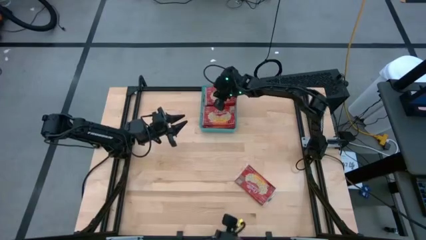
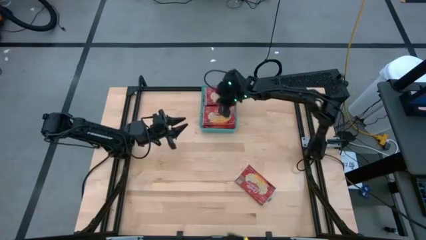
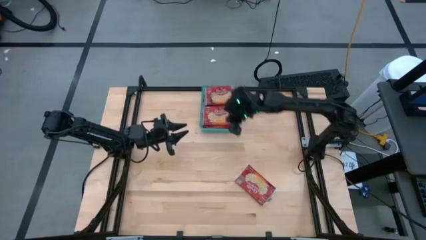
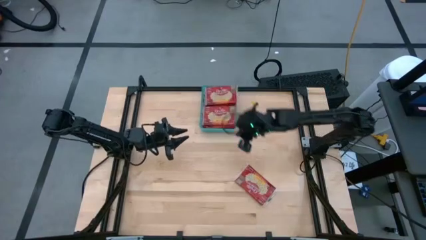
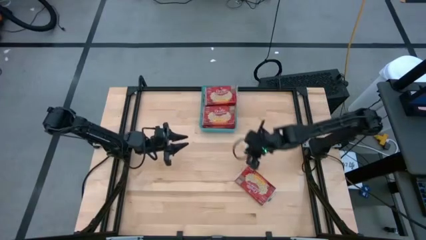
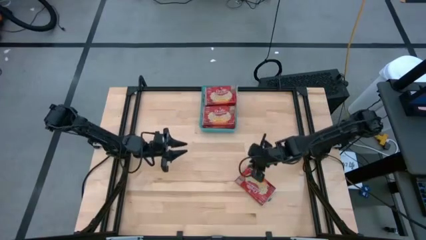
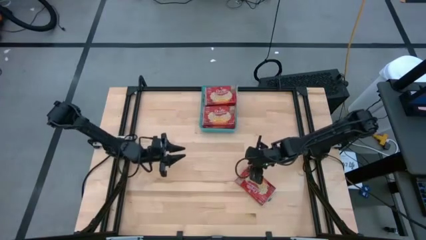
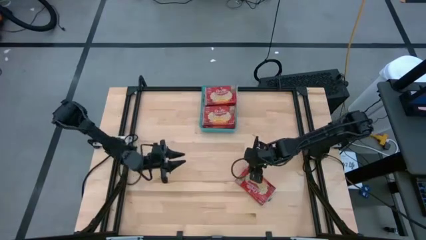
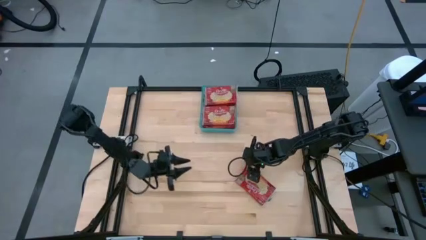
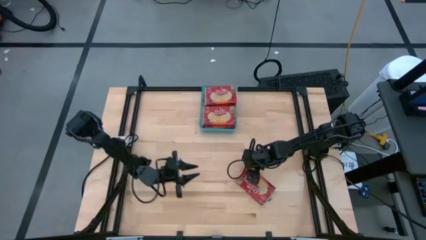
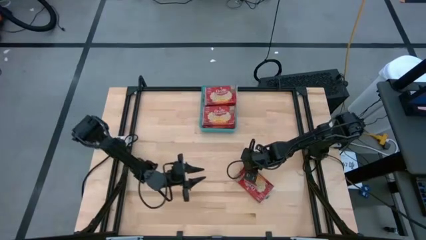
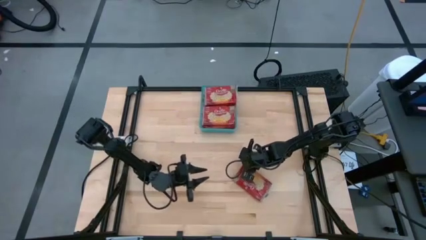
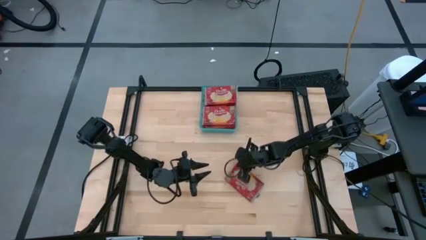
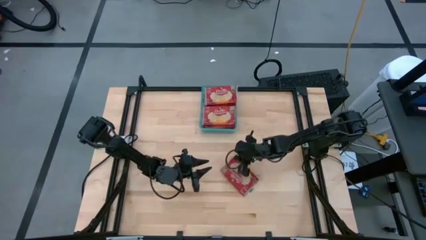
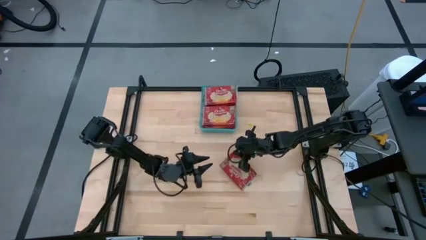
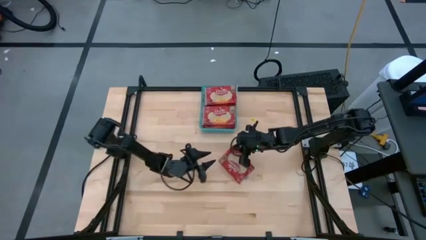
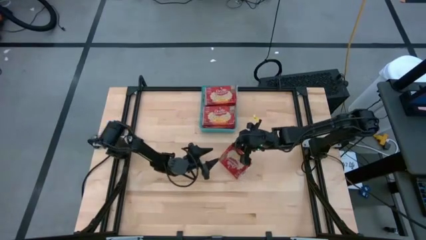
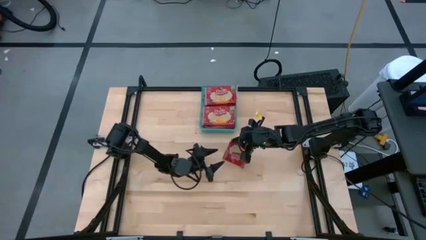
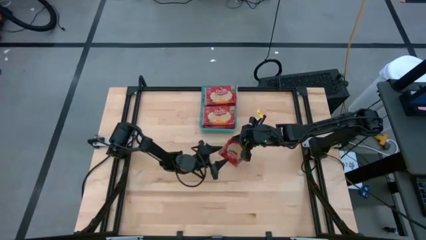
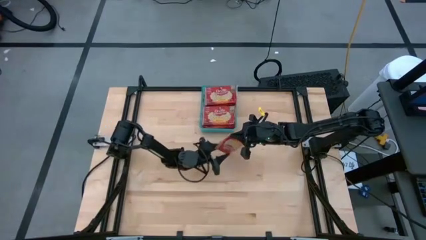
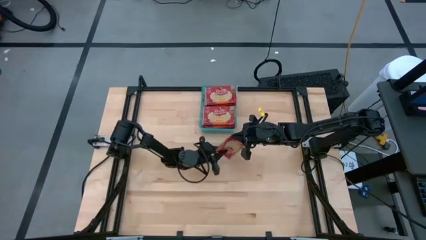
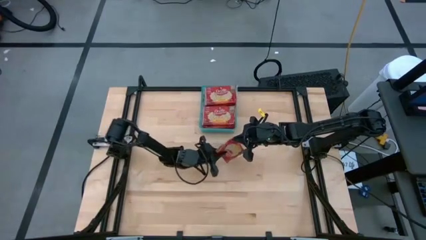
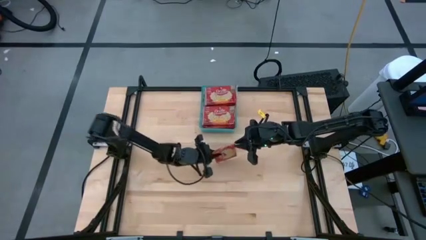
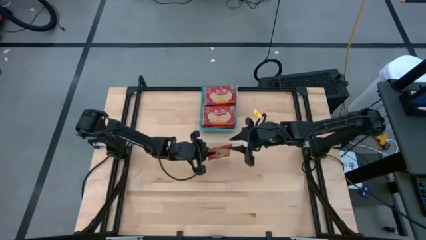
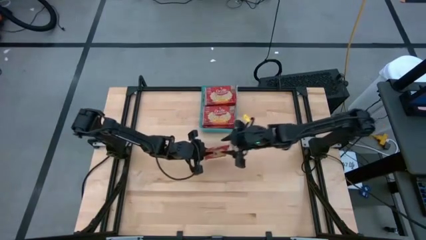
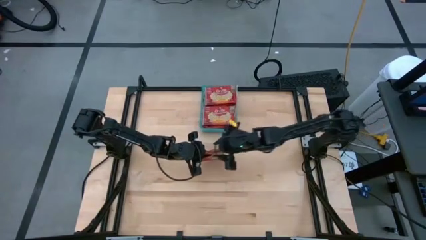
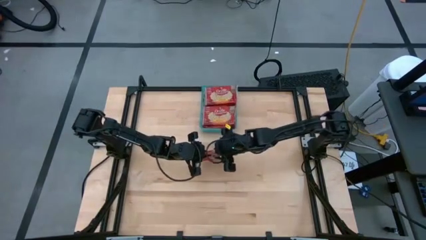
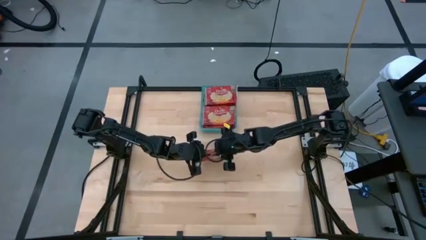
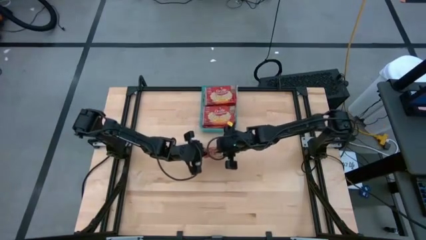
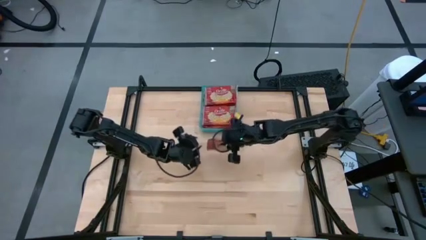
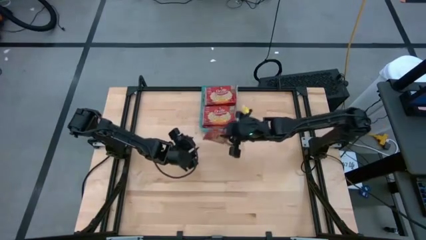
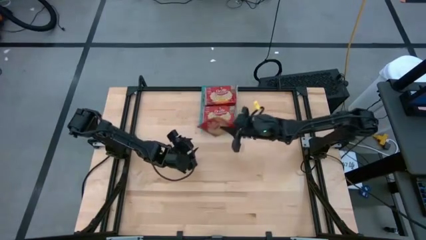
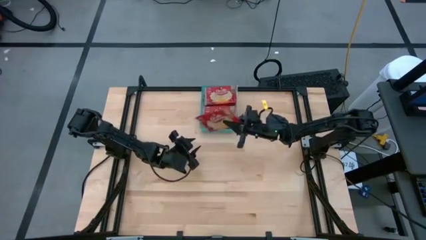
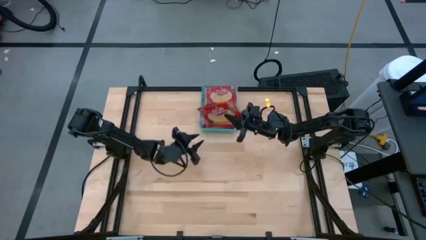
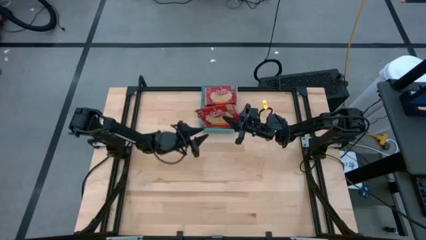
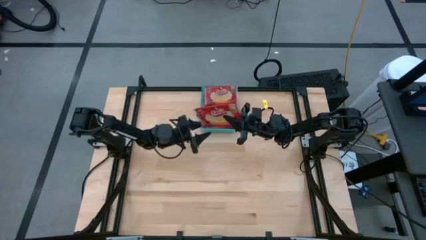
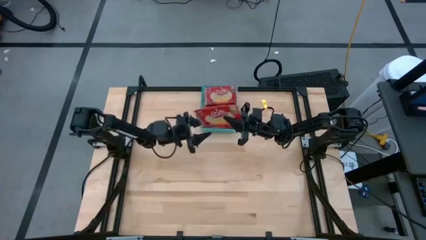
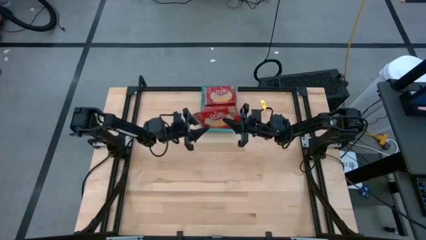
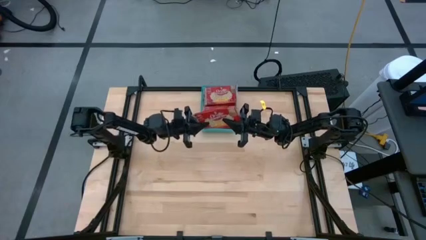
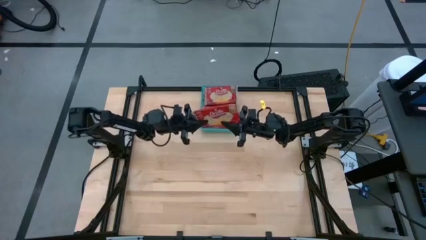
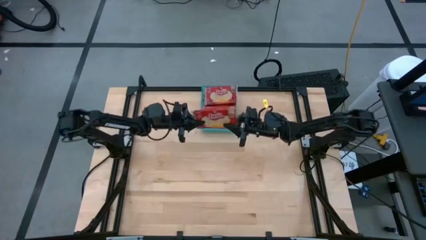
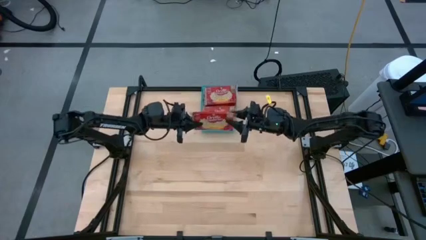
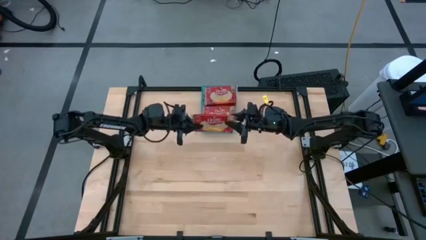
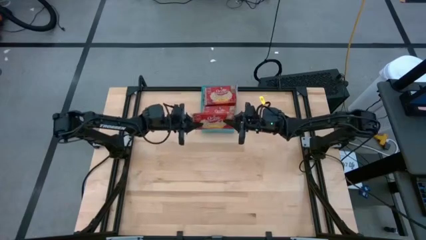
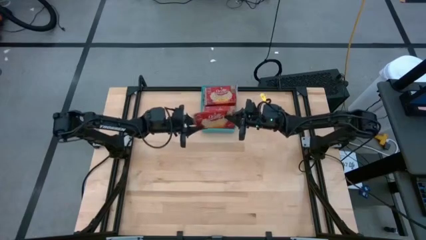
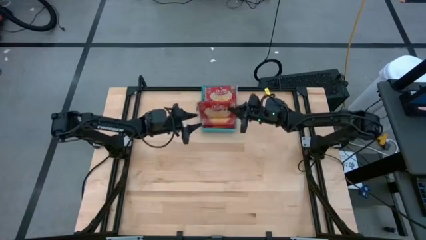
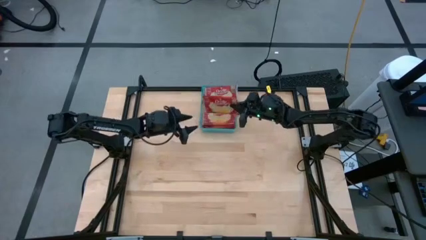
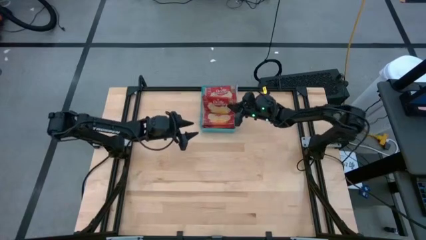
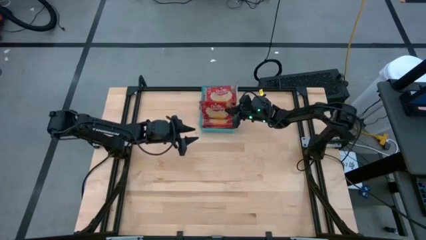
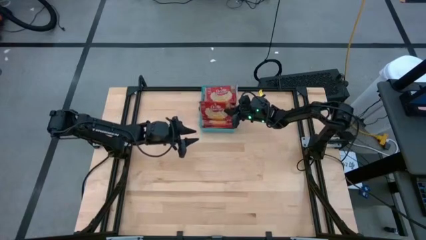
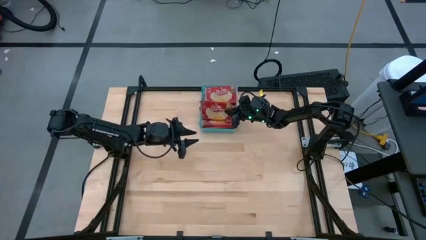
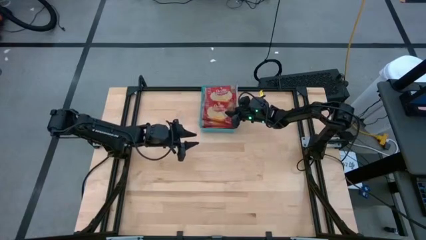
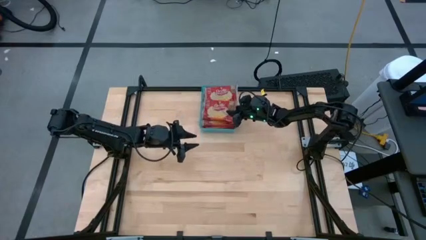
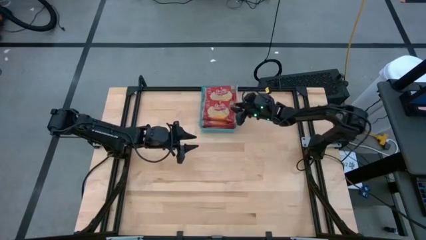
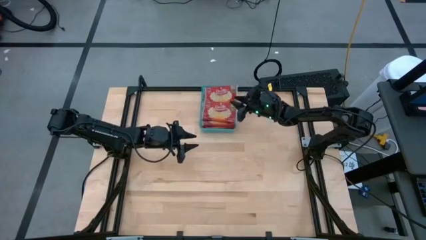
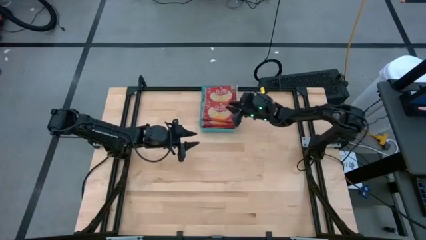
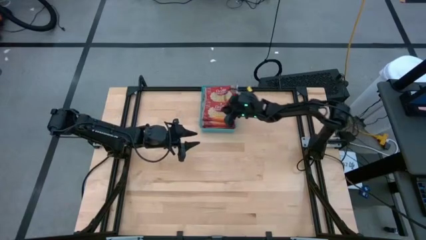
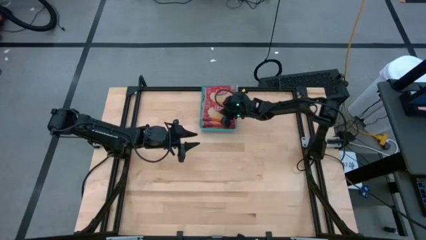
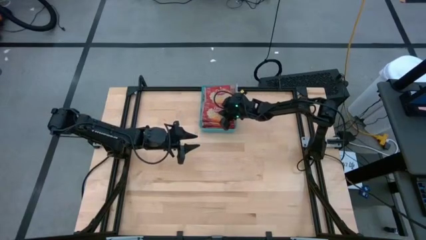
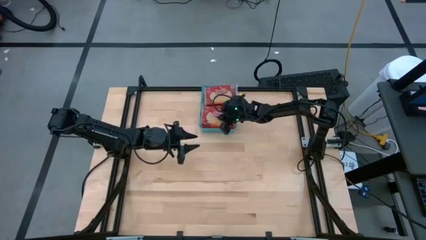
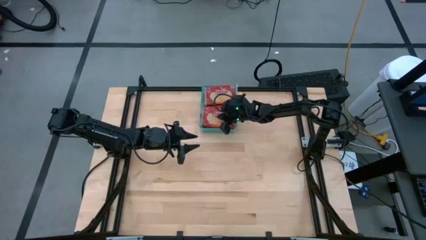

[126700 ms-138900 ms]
Task: Sort popcorn bags into baskets
Put the red popcorn bag into the blue bin
